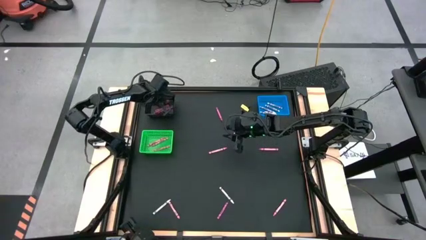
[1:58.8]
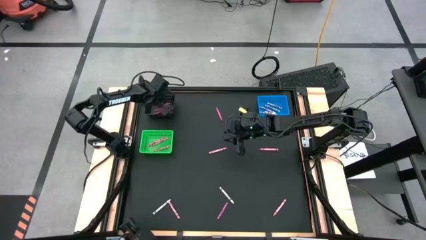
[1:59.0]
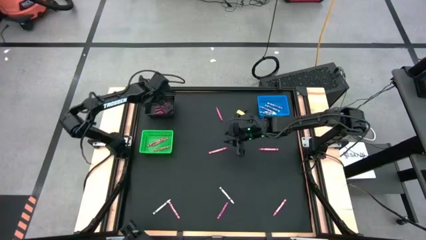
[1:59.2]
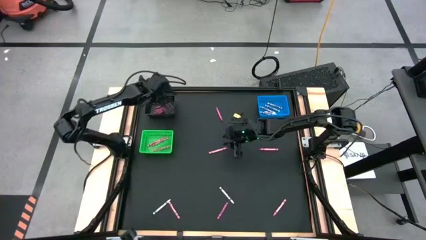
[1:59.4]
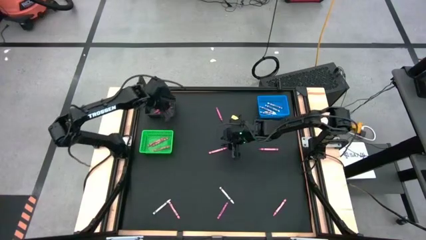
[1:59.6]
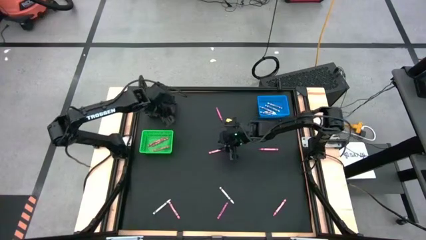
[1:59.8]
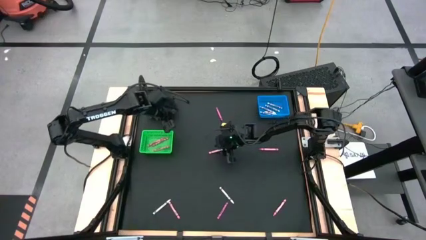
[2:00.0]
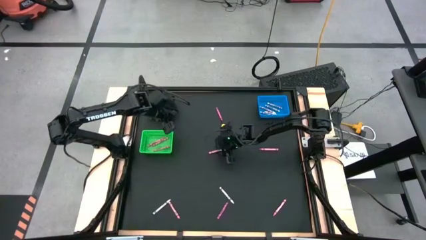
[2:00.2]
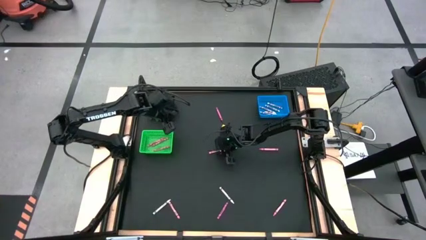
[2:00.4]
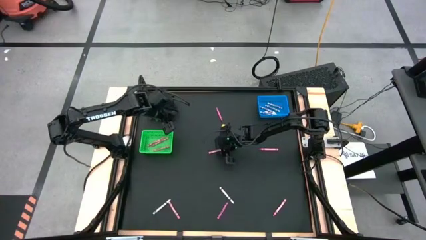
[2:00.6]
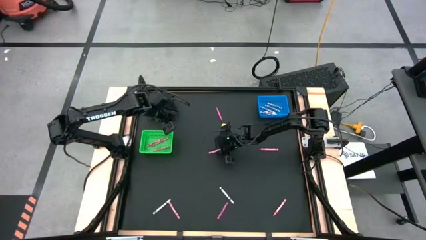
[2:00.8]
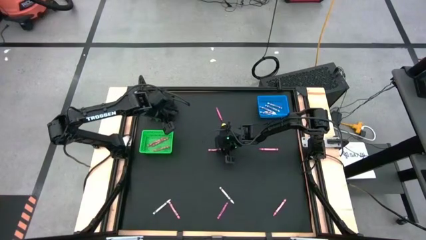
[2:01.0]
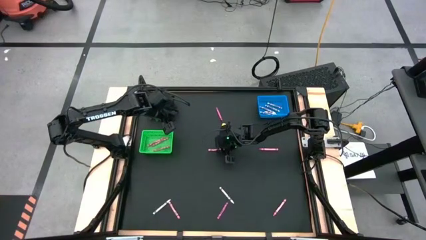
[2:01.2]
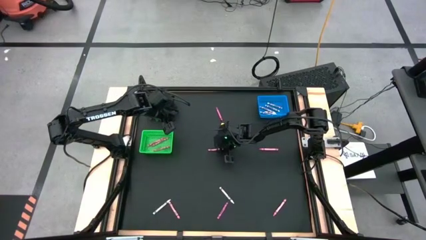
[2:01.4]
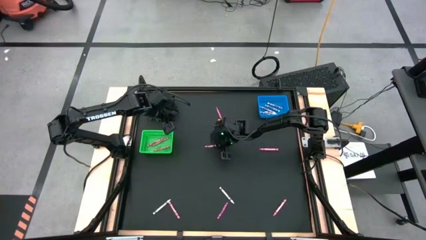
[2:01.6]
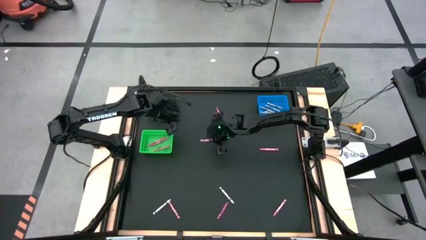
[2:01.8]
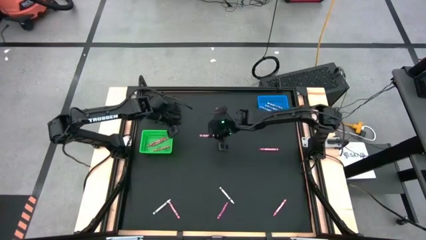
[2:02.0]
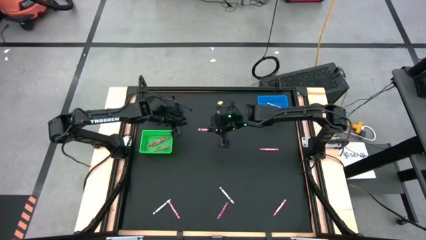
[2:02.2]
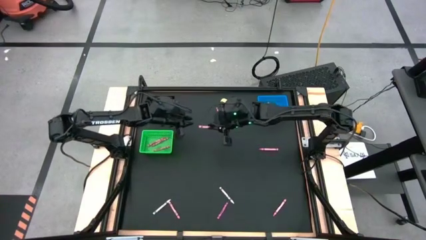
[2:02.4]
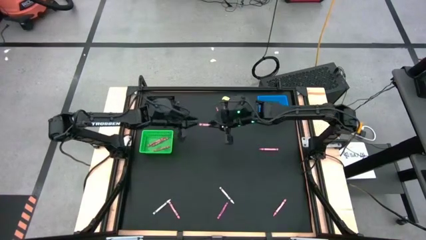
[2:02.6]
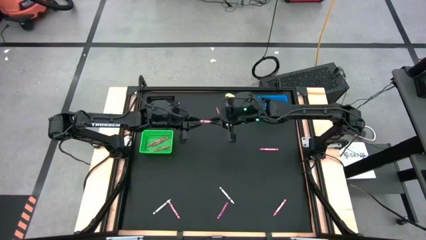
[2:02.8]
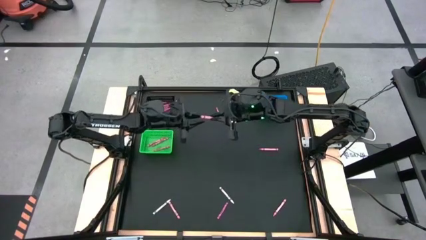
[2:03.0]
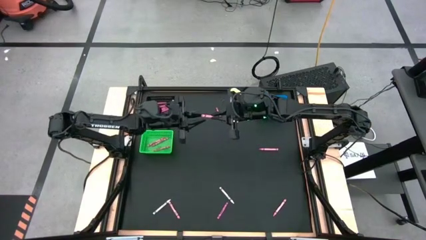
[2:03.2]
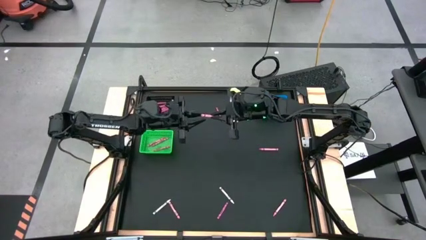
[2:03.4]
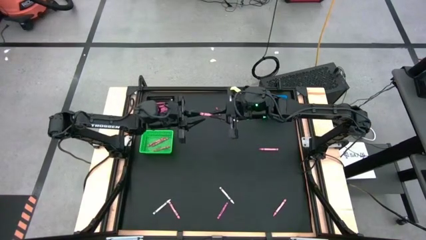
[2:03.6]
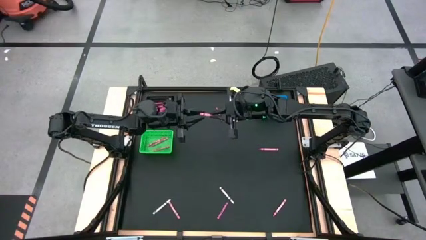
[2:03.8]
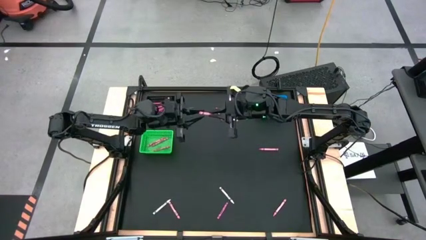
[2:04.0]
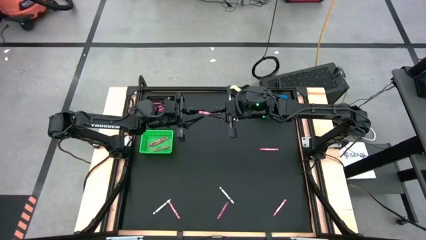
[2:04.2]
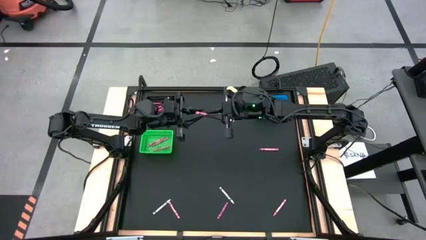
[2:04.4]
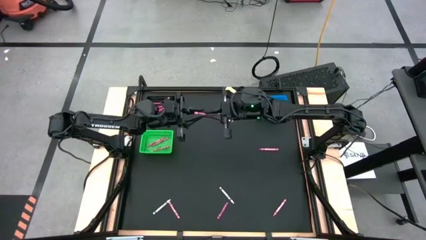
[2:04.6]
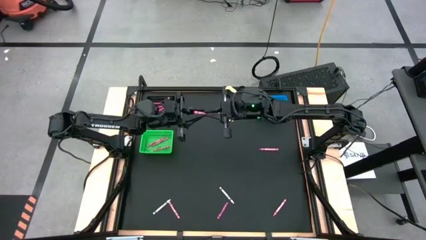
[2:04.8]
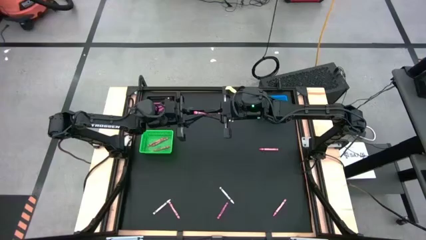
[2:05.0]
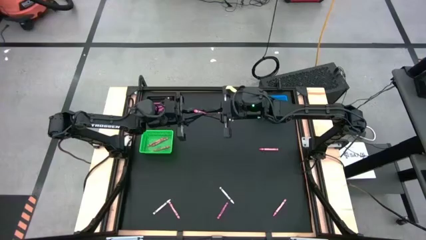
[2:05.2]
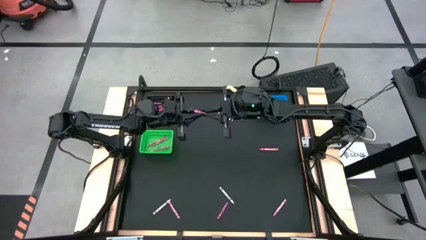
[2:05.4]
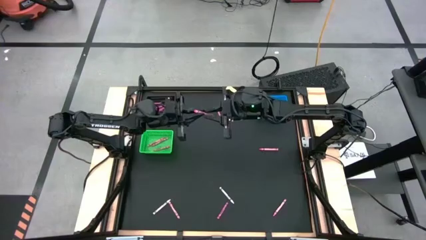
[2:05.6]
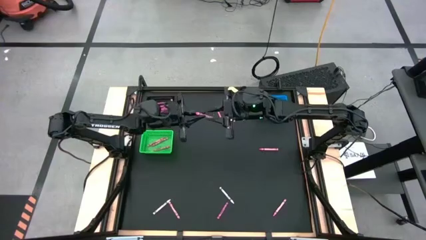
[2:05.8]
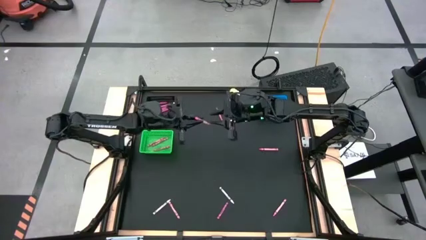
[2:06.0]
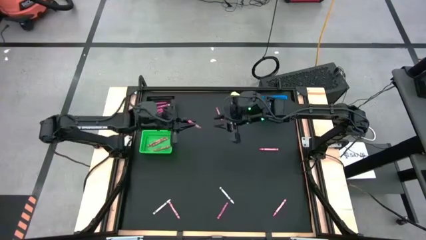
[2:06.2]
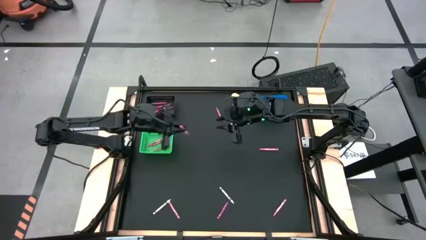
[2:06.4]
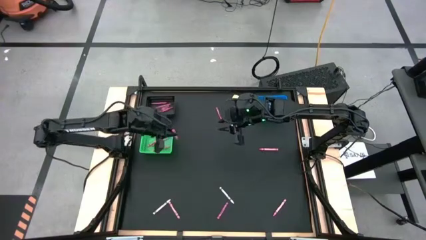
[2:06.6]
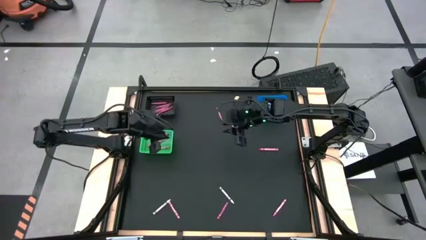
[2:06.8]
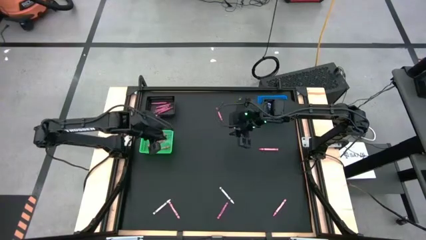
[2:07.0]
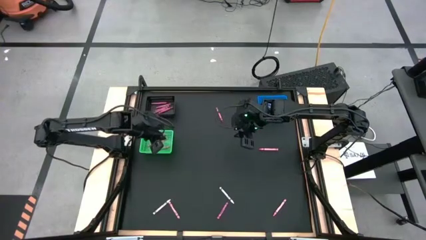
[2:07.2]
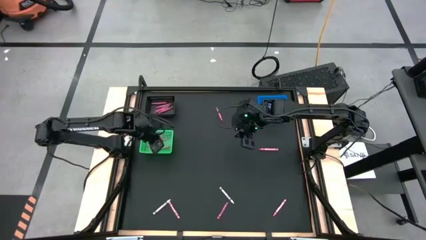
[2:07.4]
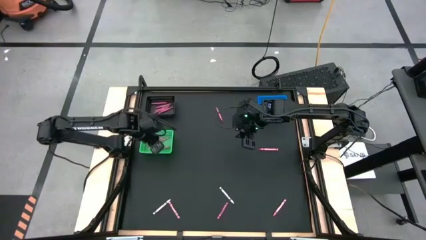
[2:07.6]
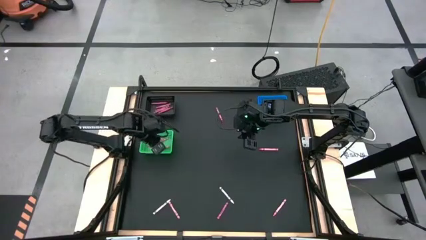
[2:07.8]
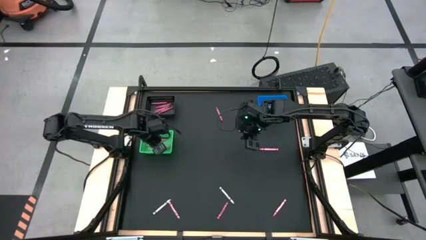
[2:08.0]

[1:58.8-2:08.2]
Task: Sort crayons
Put the pink crayon into the green bin

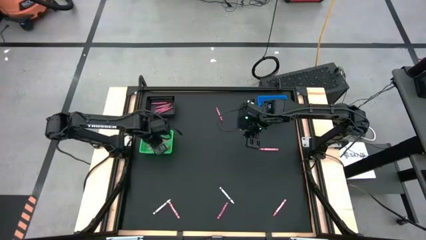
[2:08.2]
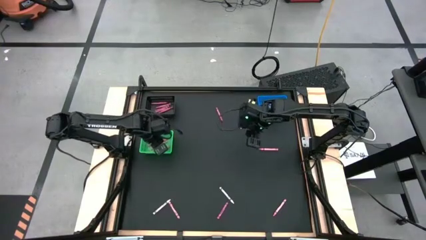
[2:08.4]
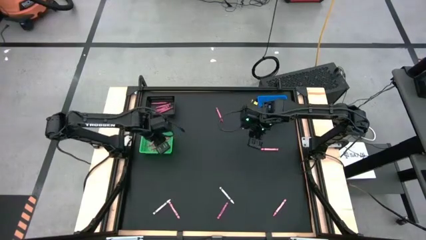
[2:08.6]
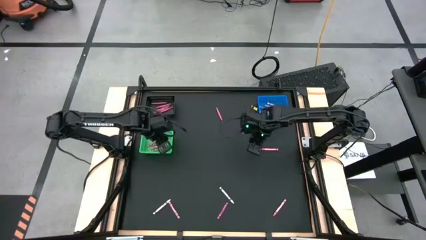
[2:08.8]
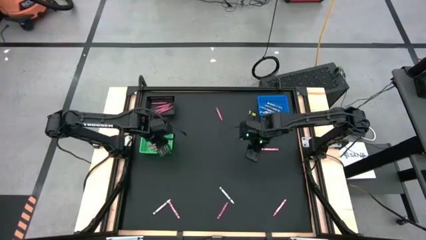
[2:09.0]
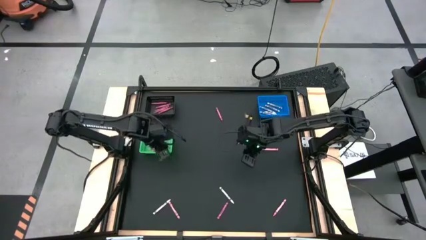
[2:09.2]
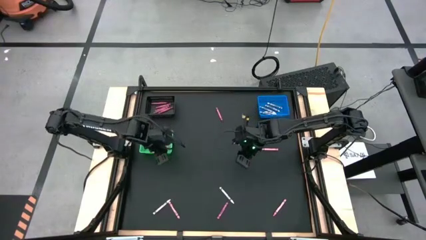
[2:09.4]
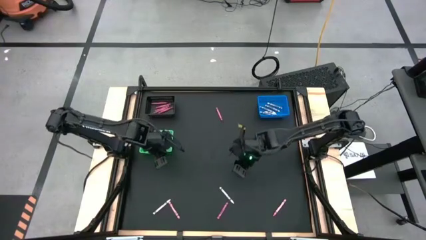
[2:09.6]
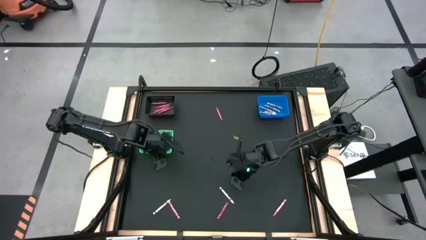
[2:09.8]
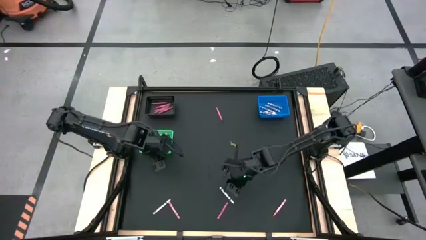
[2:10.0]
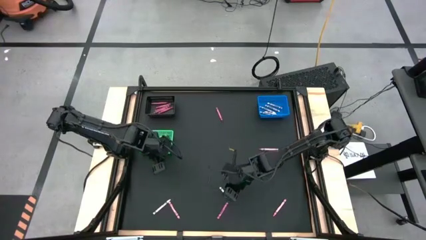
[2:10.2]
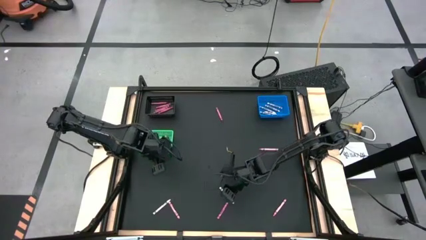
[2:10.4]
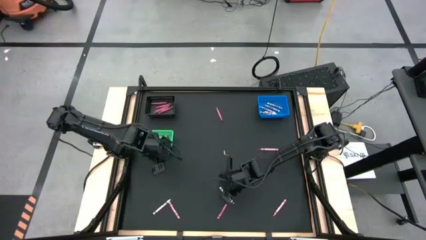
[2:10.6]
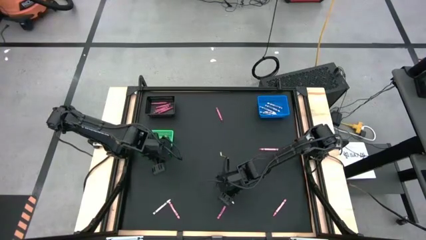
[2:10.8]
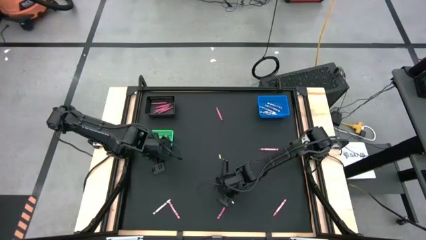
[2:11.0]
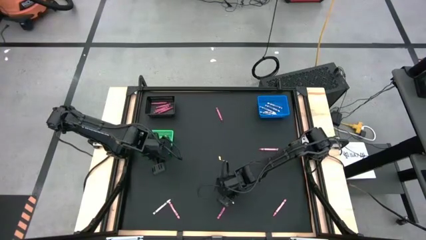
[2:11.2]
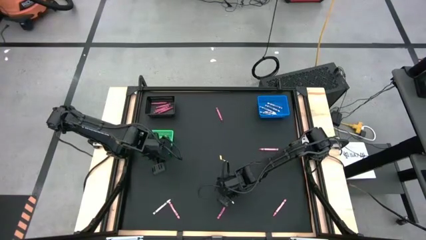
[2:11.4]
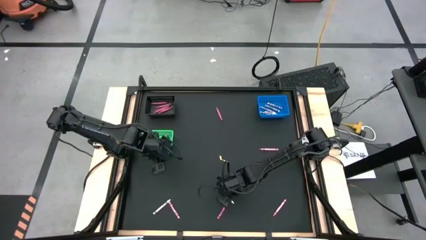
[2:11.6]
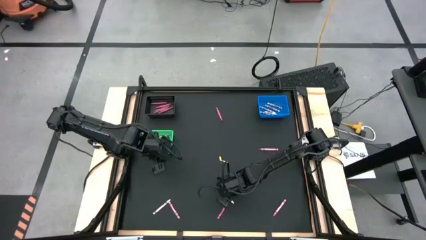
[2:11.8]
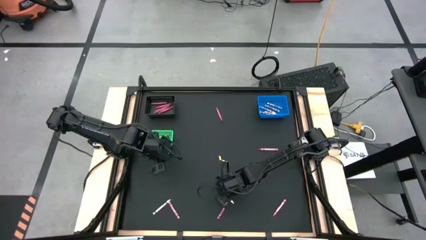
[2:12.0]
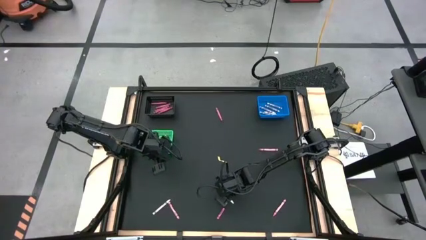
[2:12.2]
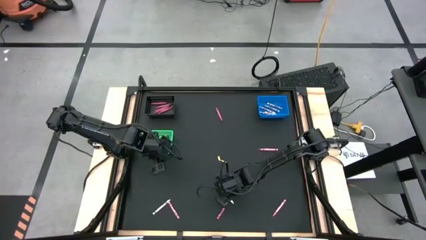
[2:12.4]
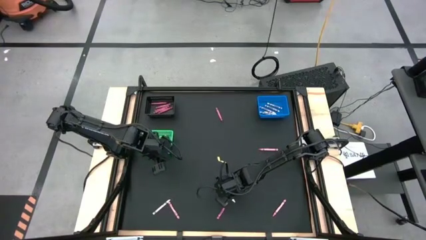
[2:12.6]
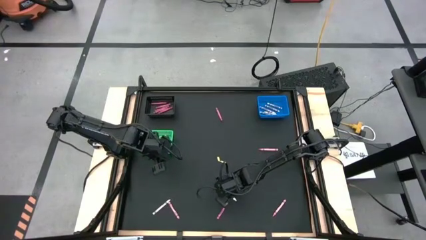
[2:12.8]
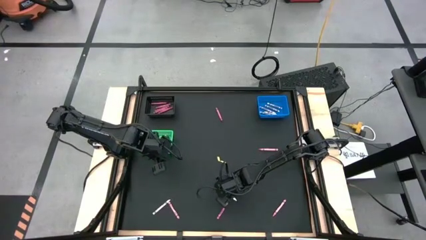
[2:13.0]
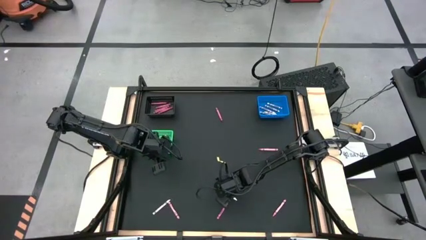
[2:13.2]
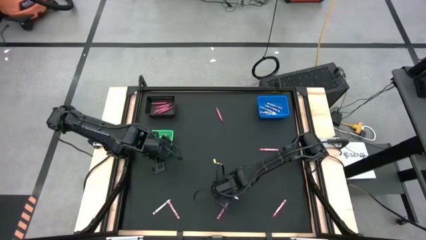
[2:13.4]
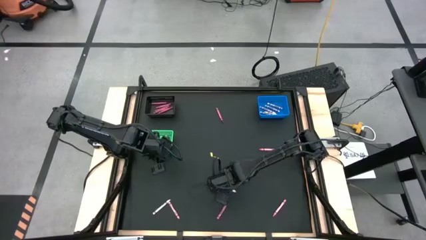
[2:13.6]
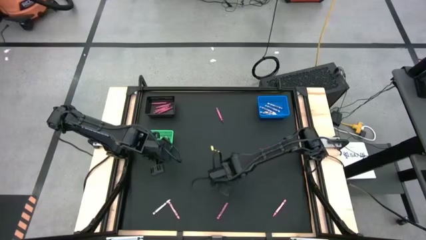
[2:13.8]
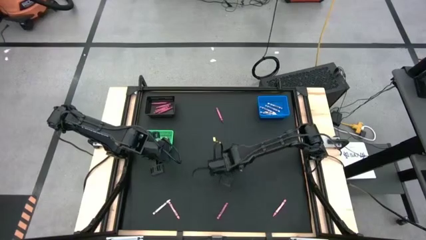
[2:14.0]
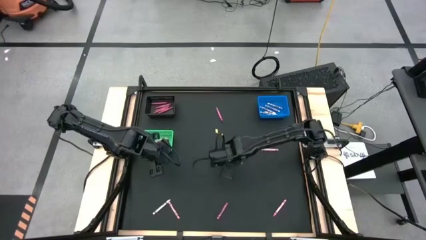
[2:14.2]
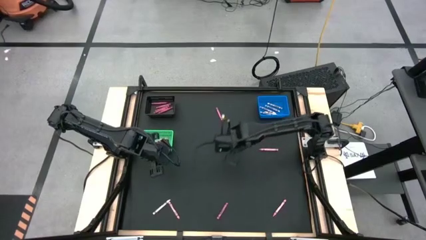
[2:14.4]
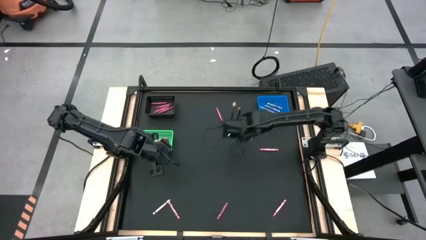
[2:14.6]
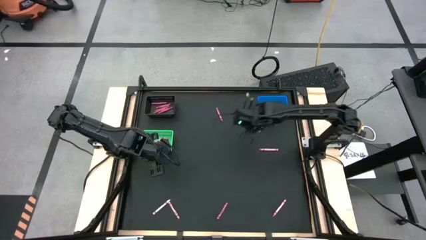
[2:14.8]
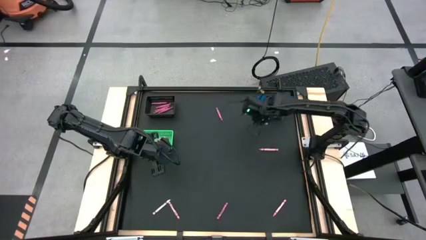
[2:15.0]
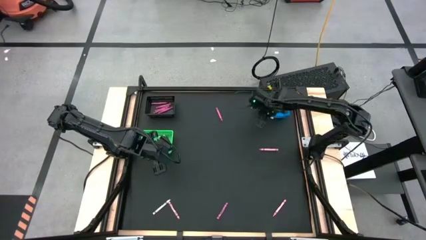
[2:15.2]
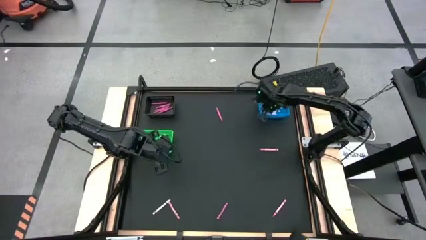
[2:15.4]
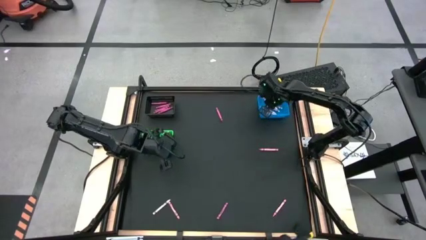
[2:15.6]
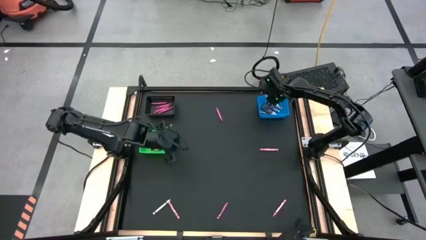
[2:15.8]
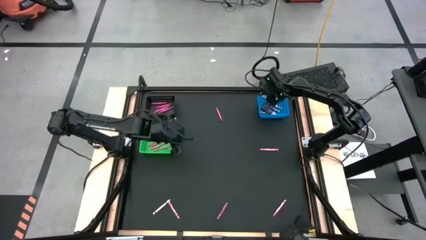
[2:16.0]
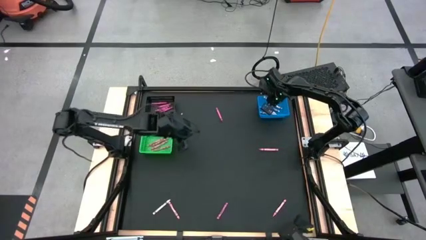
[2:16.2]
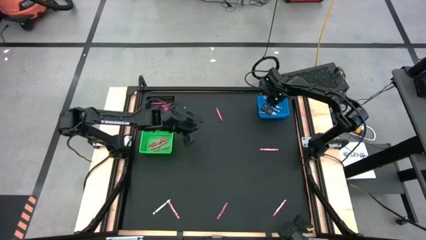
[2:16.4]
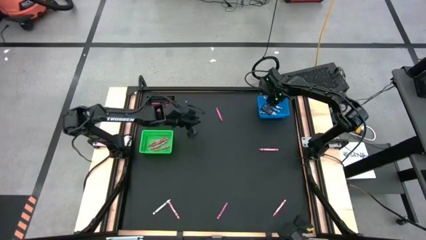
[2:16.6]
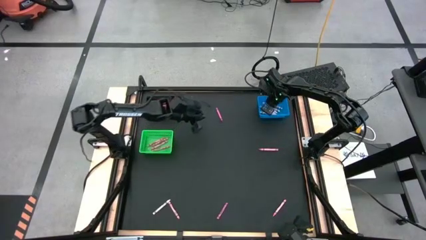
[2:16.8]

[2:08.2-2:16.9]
Put the white crayon into the blue bin
